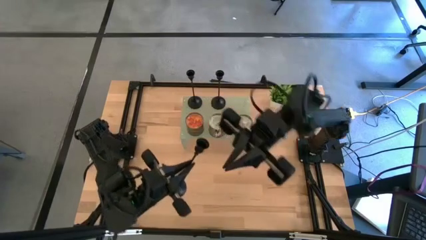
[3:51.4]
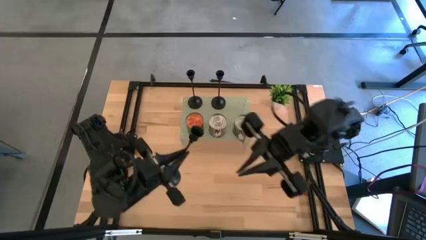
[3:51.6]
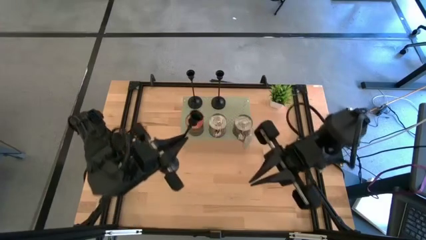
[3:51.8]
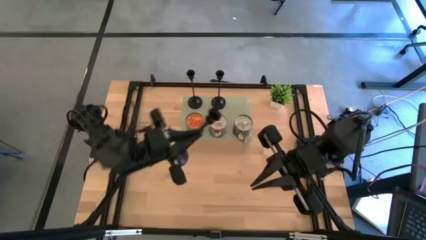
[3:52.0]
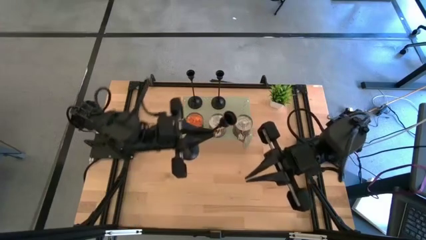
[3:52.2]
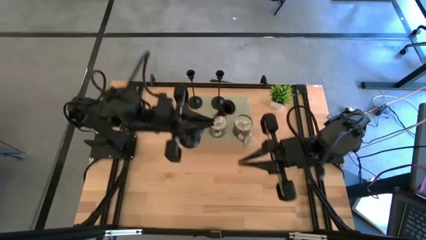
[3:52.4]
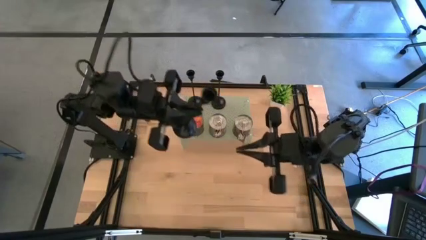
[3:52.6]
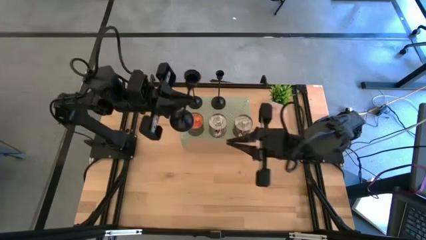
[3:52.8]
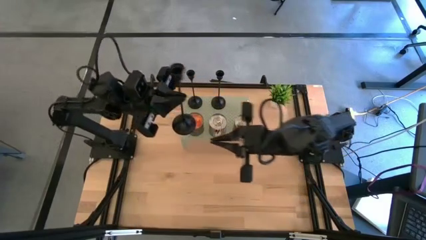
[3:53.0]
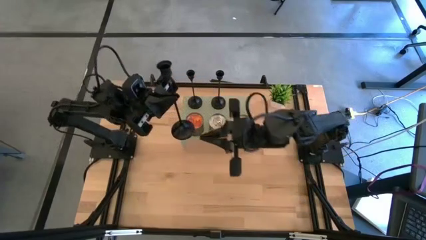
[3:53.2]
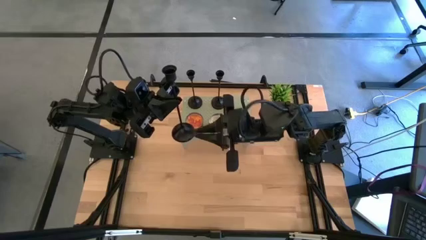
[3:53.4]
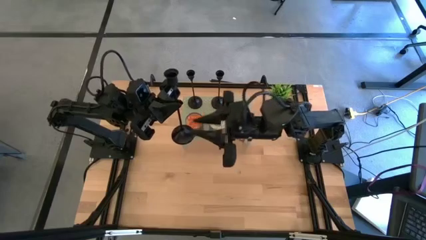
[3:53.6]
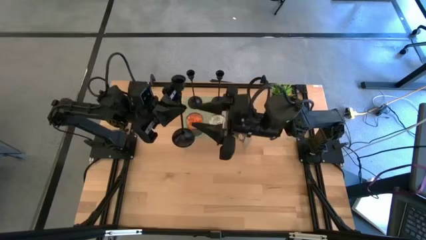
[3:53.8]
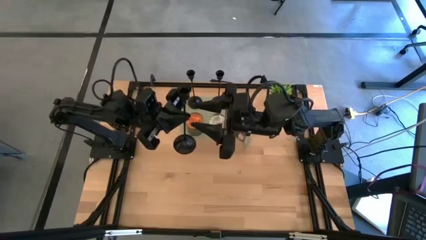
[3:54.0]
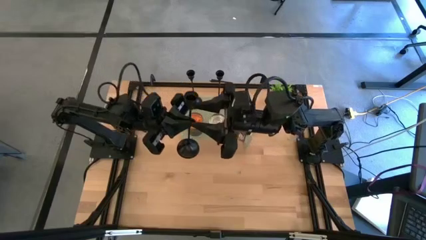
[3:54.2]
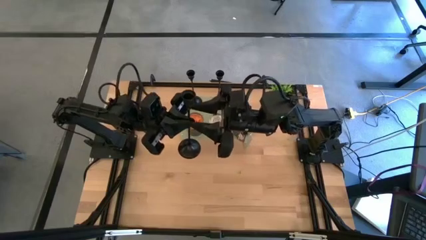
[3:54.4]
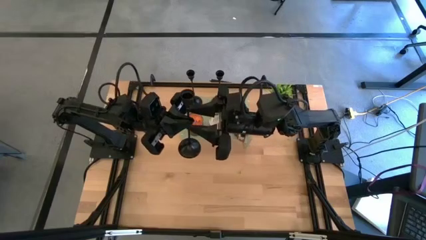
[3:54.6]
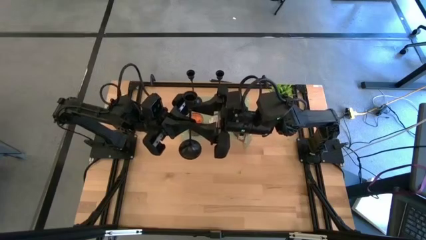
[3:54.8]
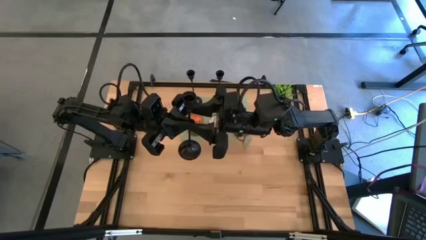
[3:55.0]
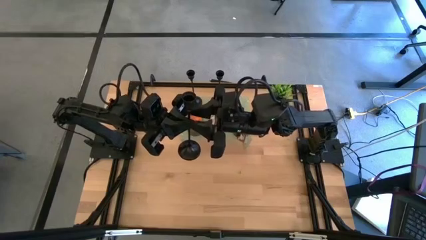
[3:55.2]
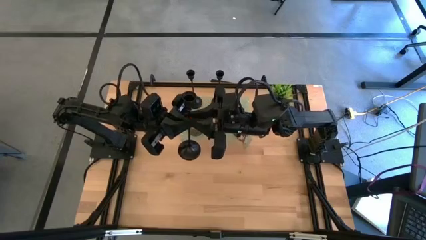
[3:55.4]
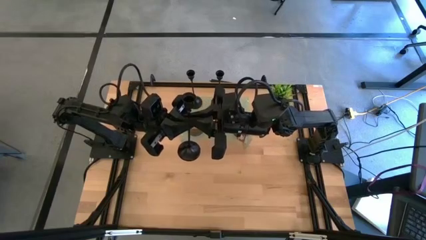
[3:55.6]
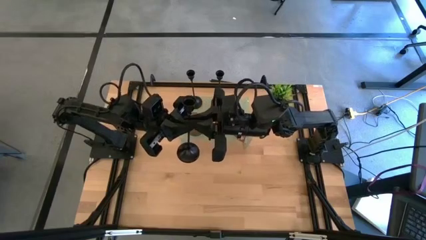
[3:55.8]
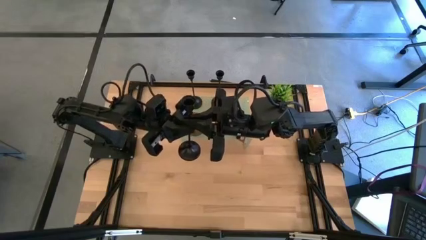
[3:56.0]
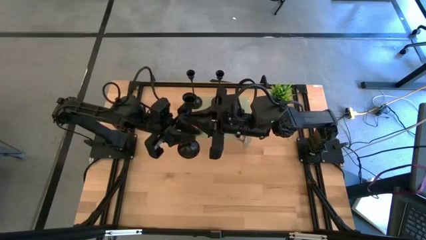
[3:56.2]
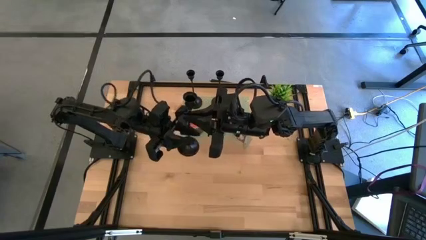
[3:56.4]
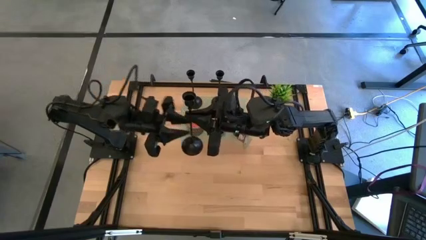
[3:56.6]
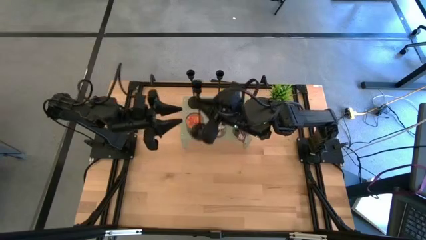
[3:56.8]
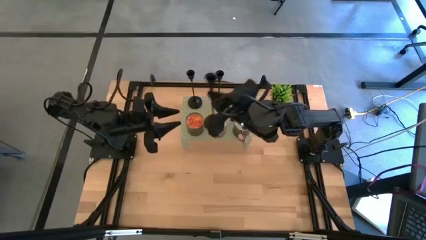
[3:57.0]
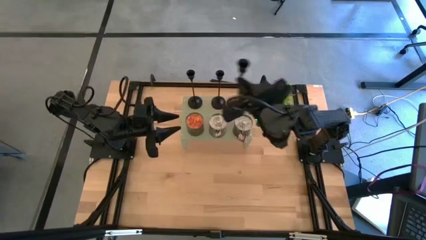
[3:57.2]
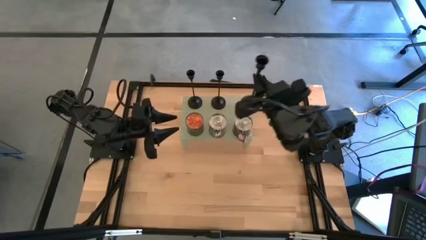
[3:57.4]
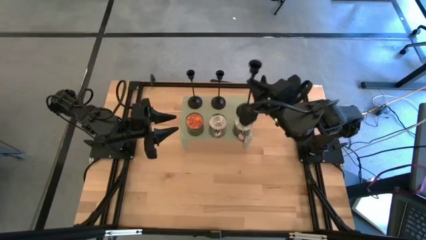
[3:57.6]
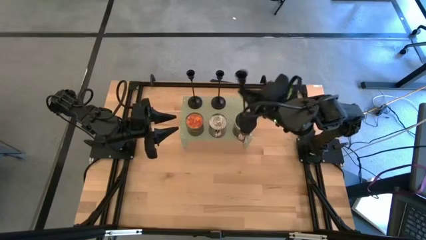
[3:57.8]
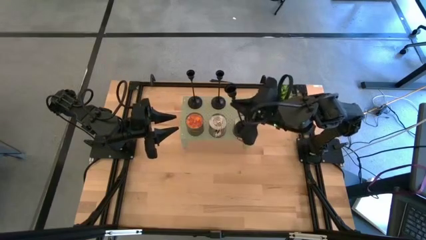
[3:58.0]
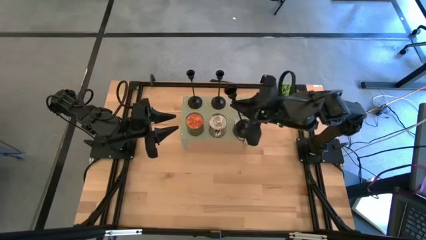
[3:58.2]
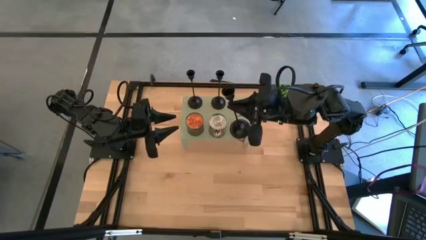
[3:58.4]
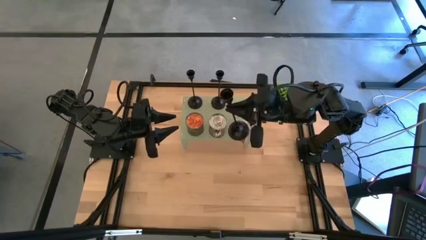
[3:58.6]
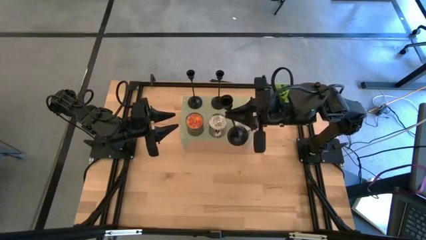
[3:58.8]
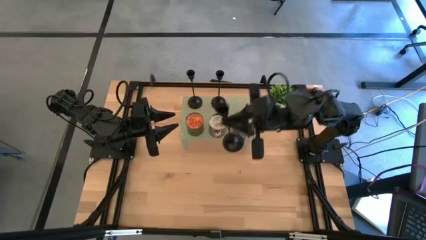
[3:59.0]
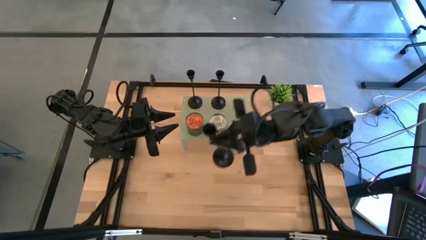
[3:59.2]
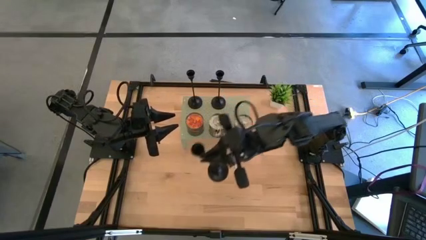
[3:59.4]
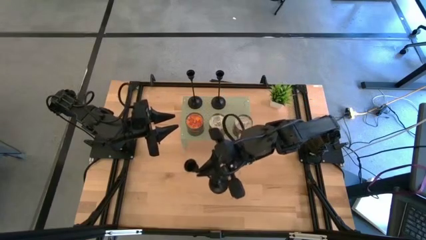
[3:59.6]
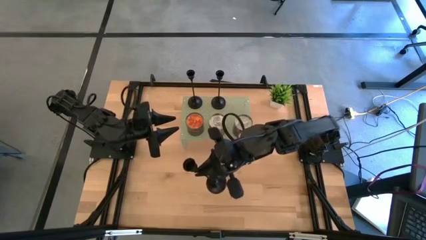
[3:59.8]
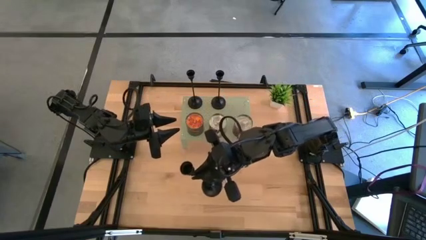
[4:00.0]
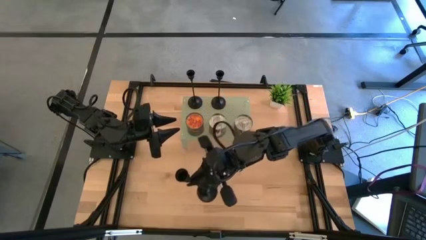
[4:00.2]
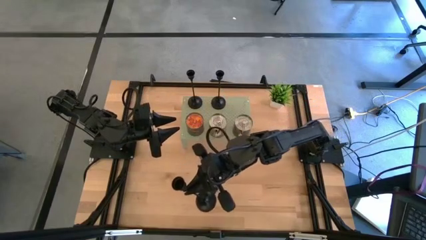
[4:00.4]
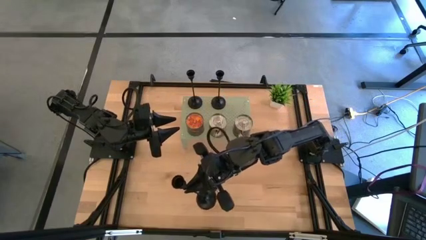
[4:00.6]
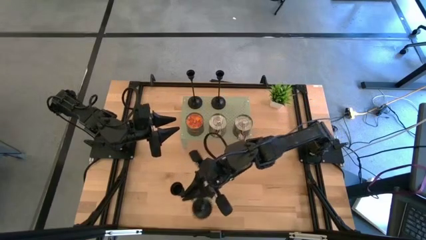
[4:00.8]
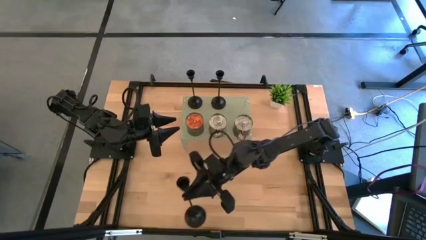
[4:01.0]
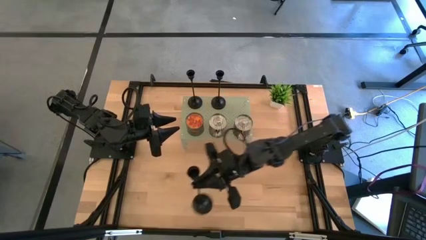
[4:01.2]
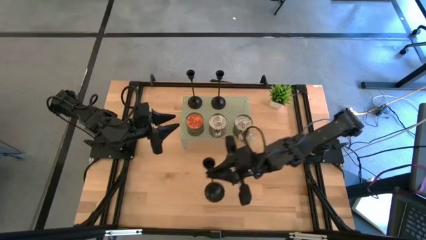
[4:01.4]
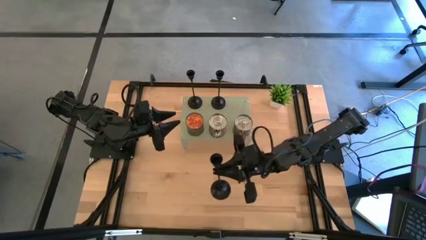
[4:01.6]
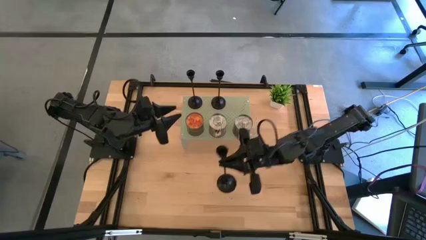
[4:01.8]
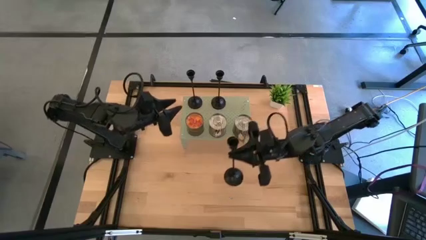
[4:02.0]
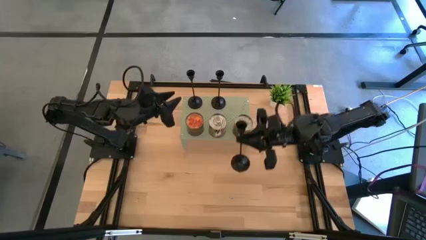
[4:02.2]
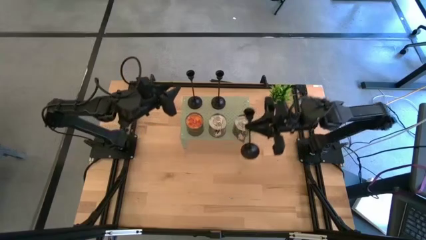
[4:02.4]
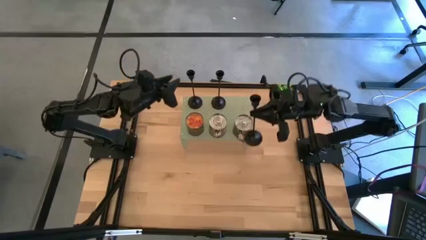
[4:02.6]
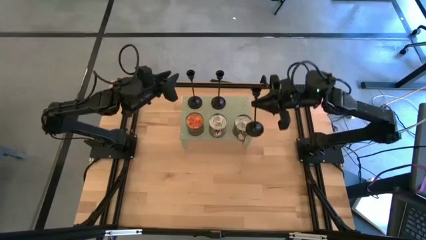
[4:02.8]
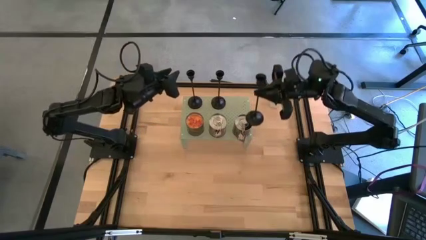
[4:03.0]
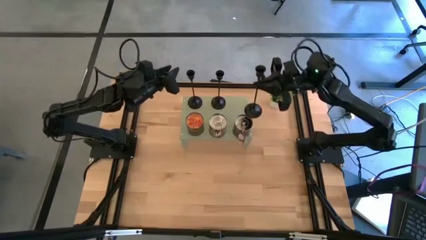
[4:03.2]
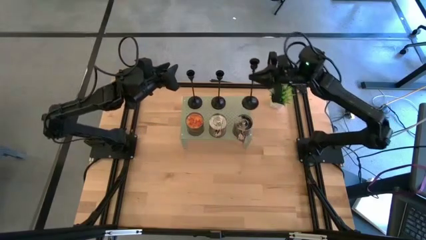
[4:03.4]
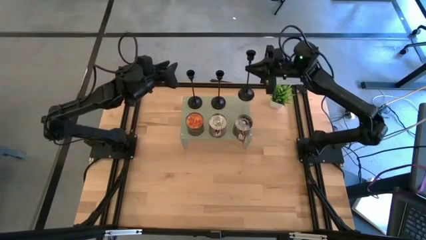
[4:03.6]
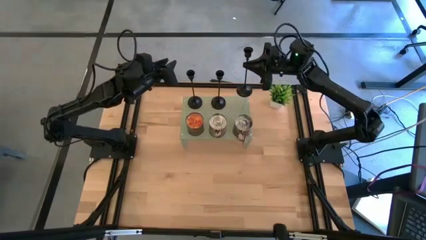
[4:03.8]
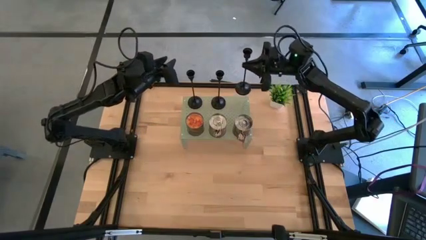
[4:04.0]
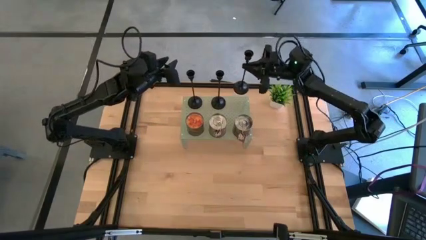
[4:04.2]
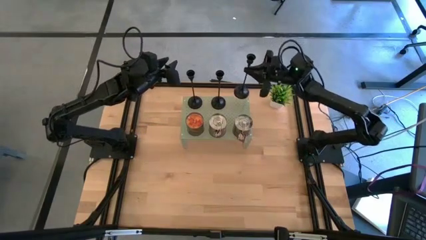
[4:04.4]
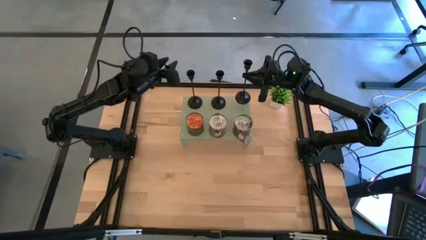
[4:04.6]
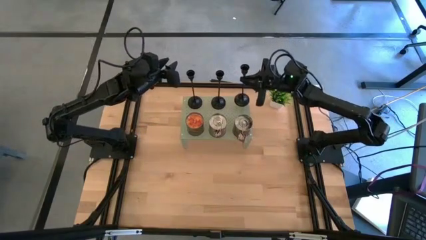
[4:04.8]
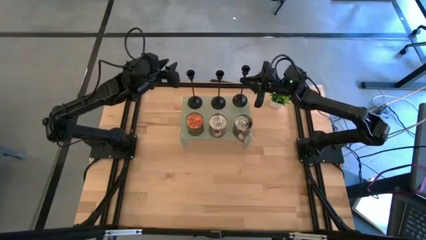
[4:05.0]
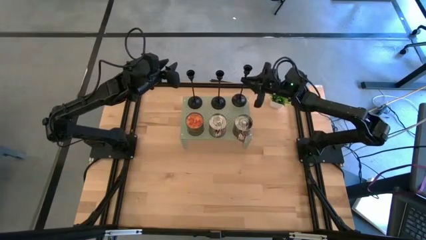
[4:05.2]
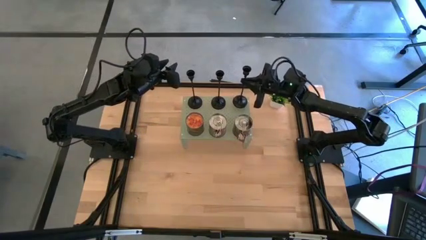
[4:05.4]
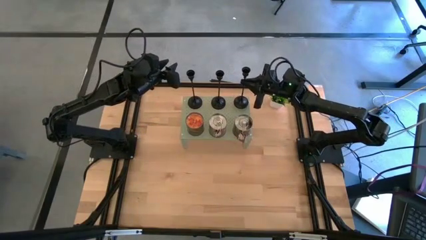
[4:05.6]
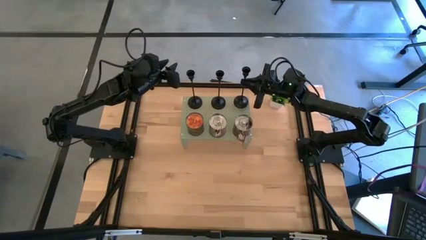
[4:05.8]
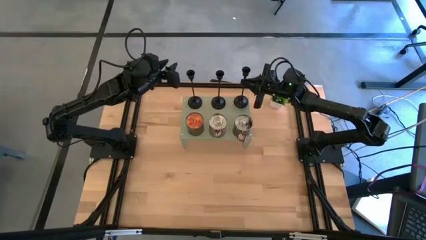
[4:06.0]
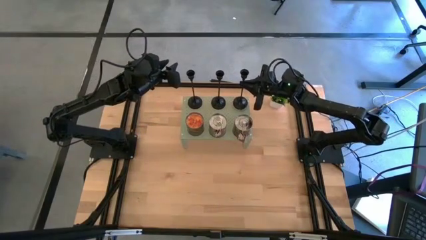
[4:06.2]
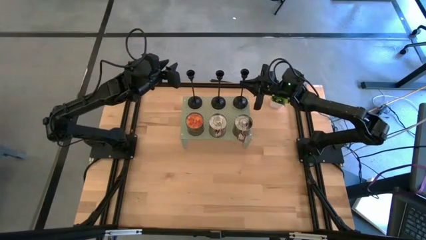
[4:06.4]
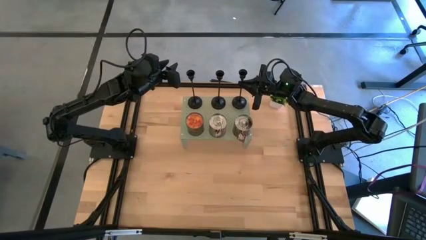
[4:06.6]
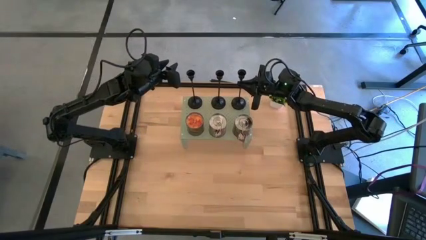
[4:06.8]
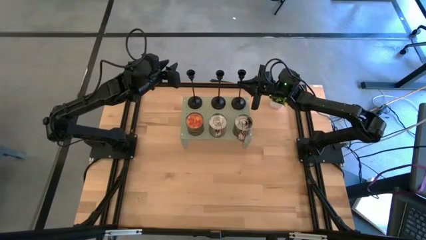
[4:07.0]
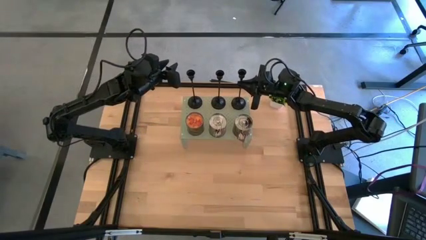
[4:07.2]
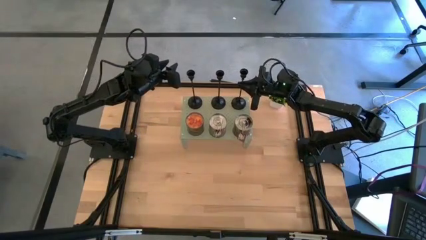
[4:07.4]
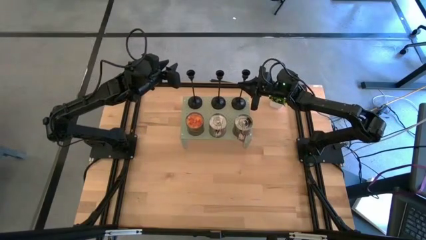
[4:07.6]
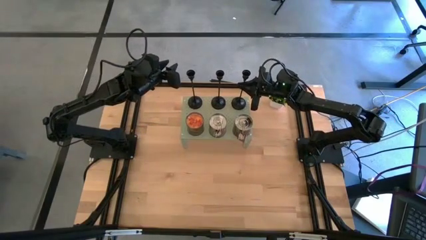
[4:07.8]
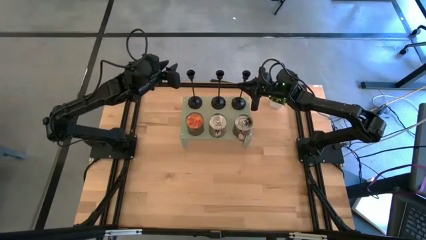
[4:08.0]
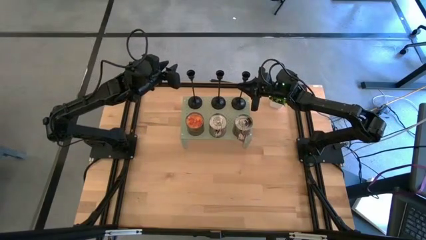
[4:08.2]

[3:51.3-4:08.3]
Task: Pick & Place candle stick holders
Put the candle holder on the shelf aligned with the other candle holder
